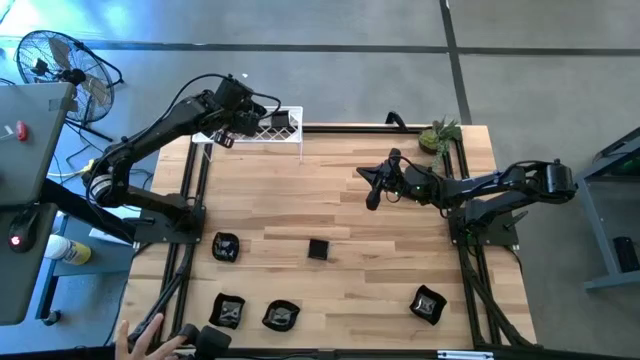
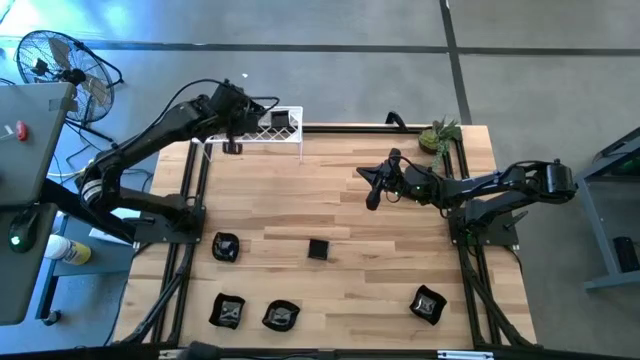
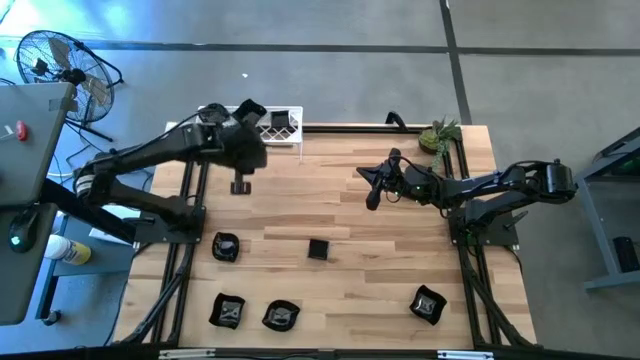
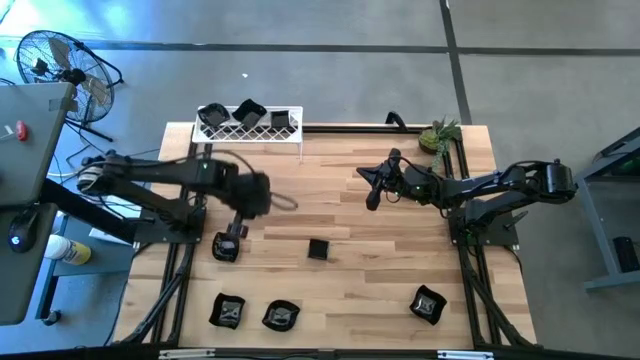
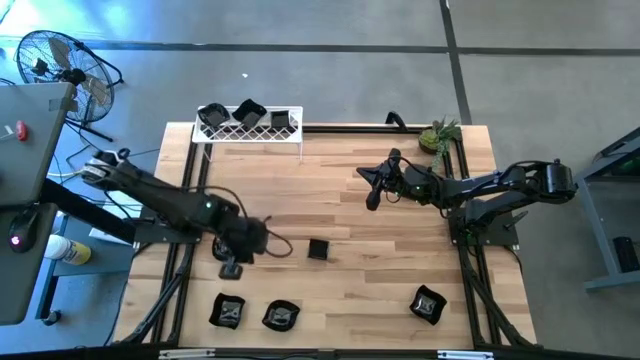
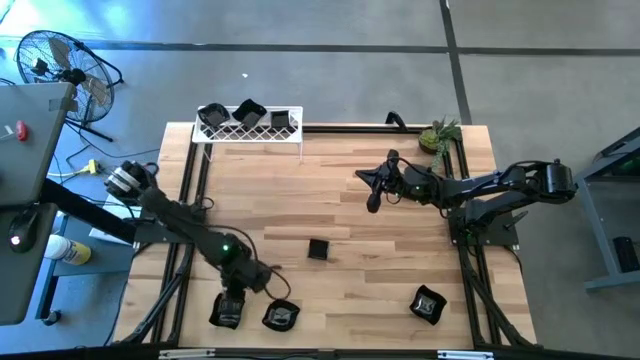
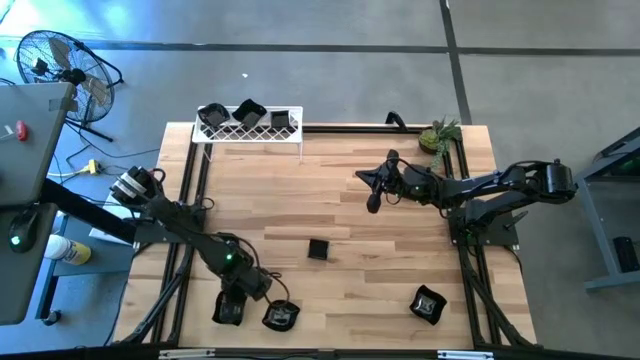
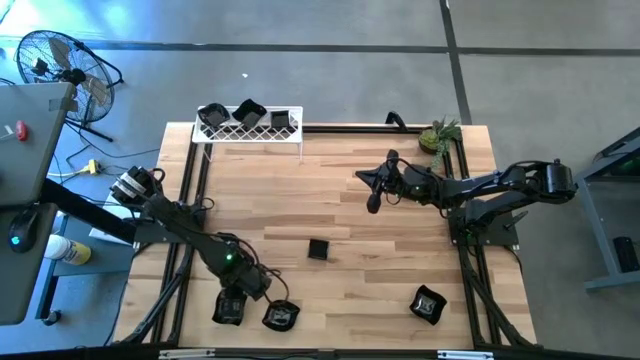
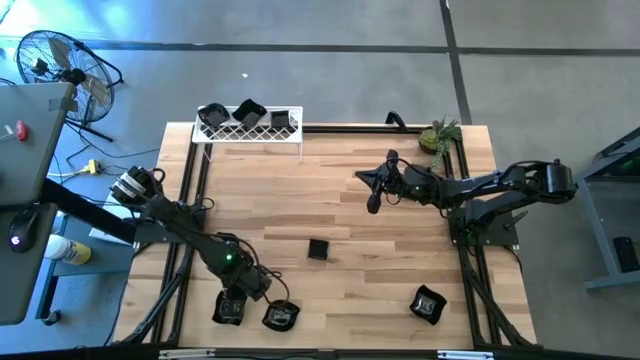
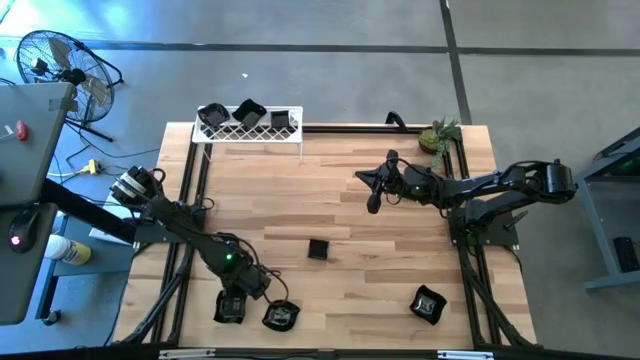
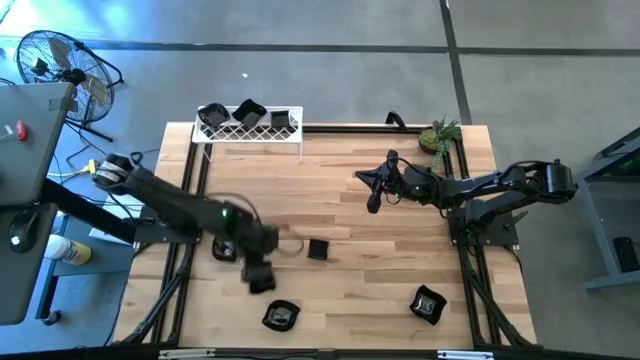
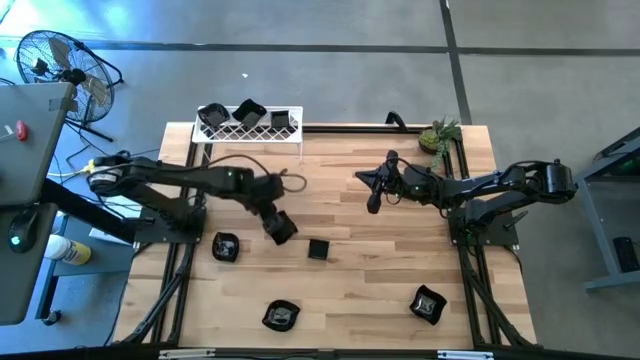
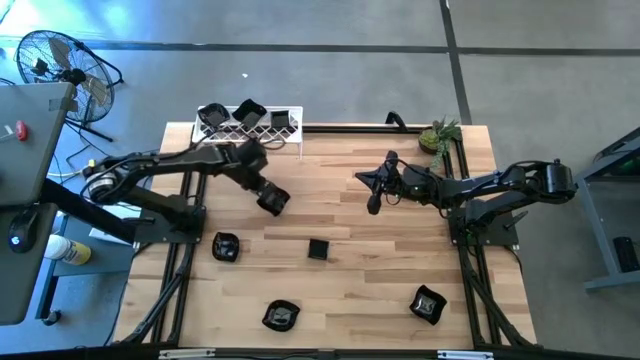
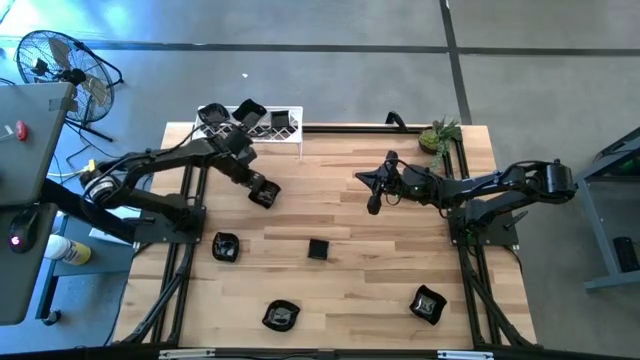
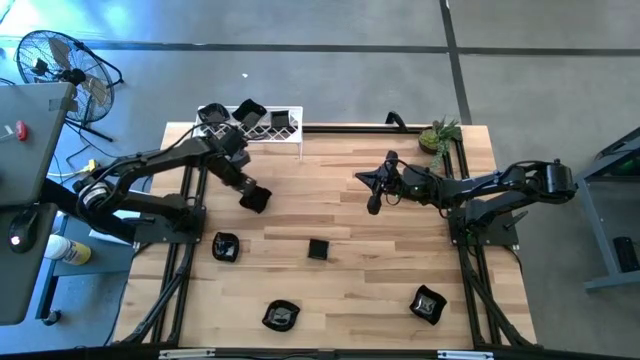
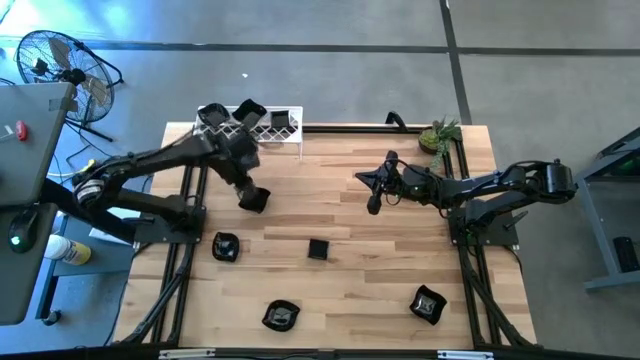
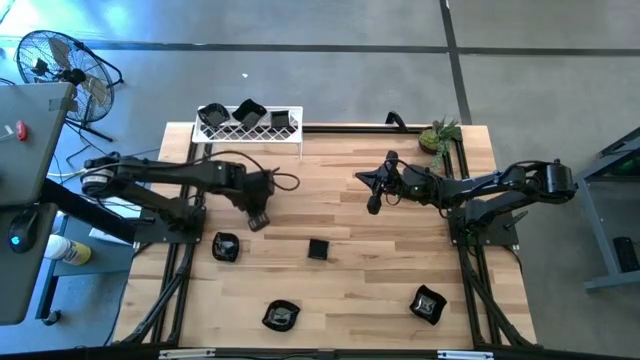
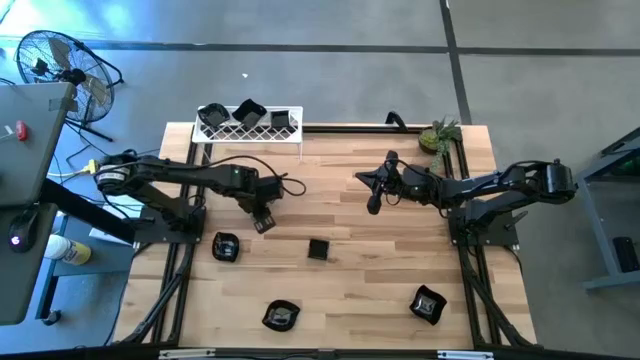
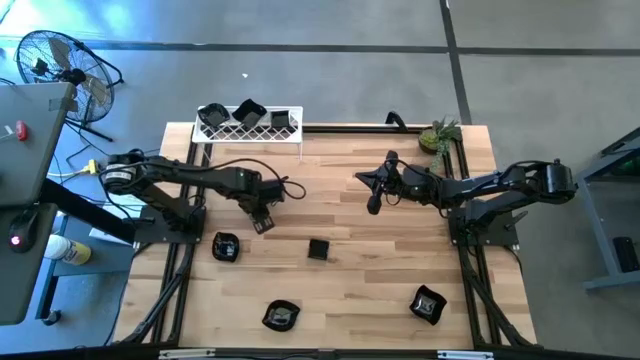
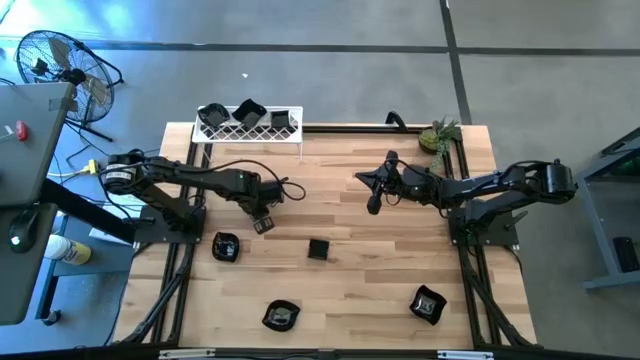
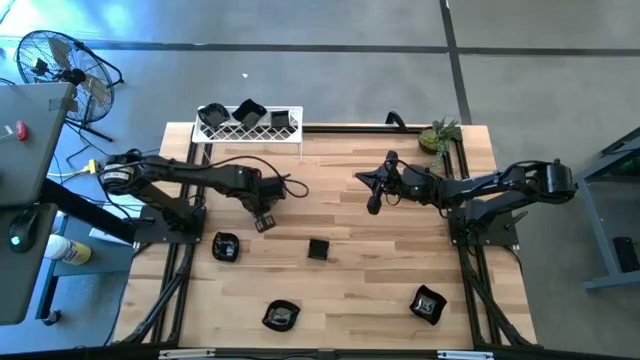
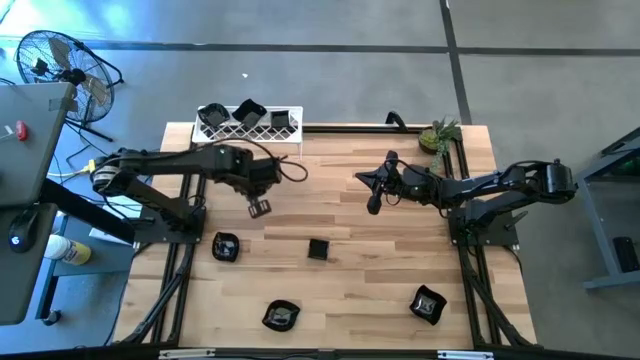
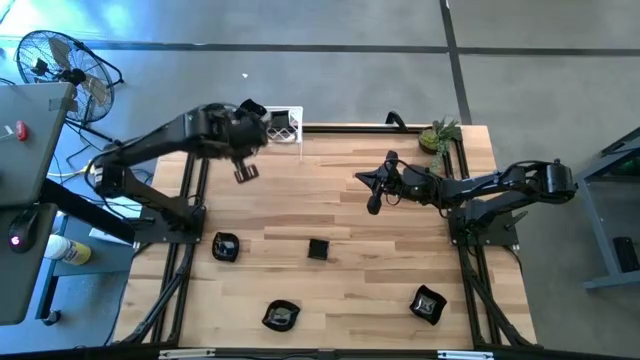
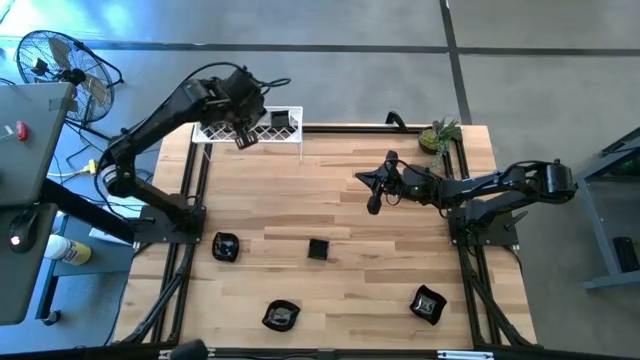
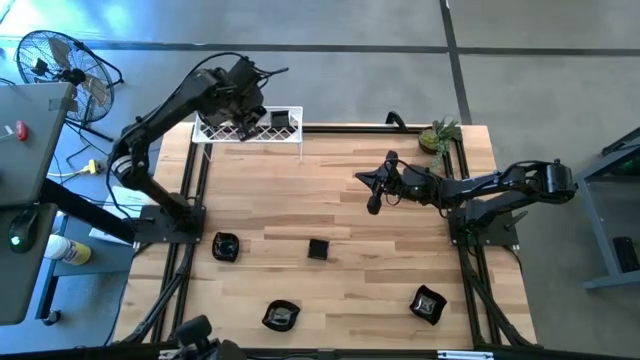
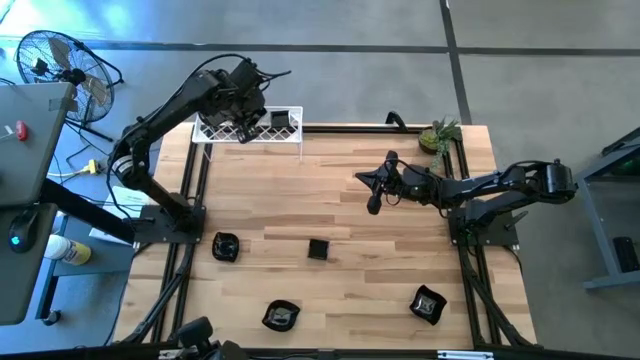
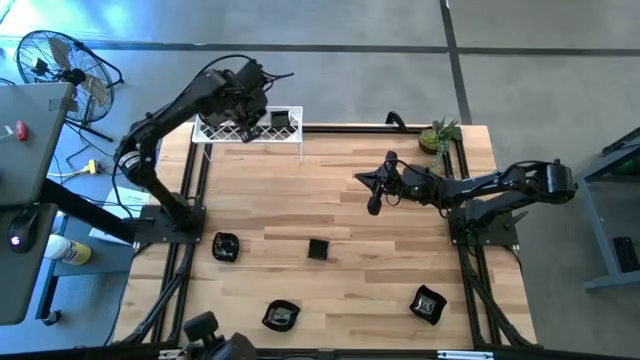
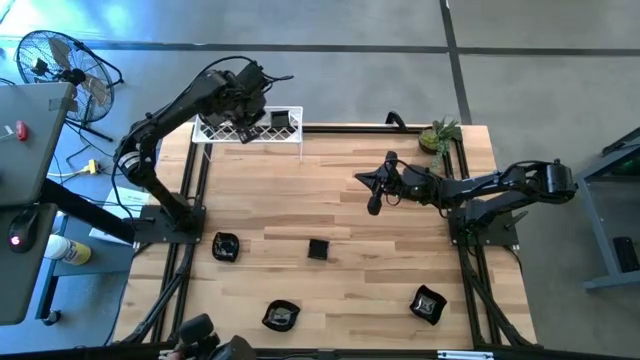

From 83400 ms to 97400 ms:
Task: Pick & Place Mini shaped plates
Stack the black distorted square plate on top of the black distorted square plate on the shelf

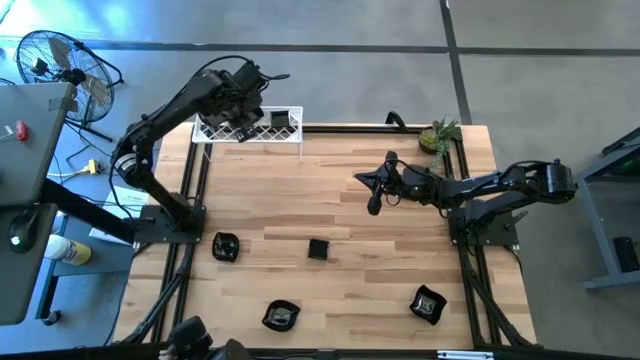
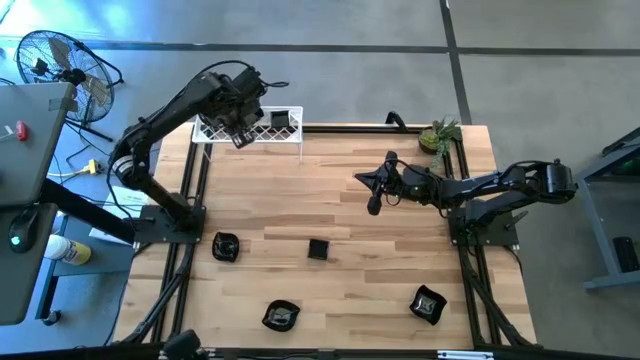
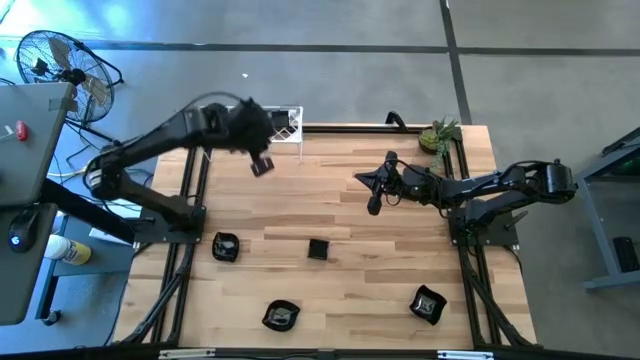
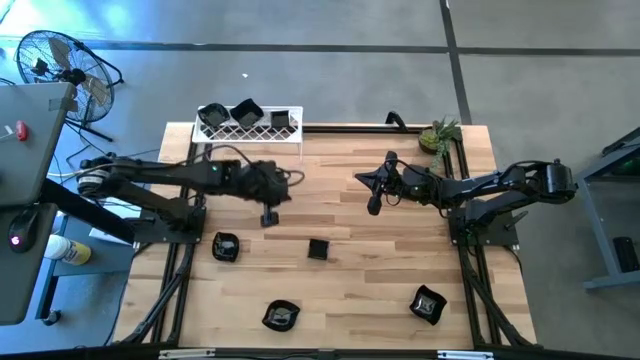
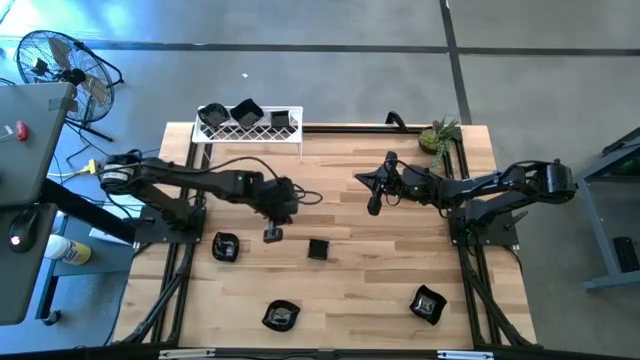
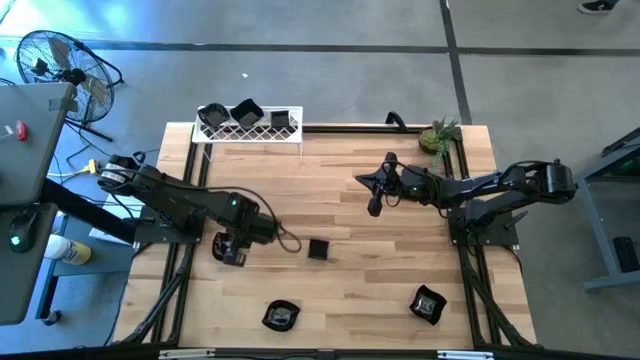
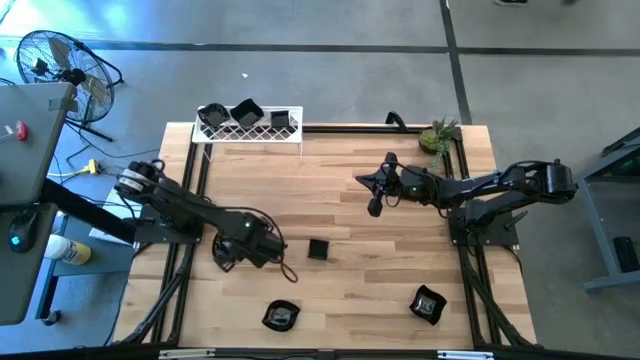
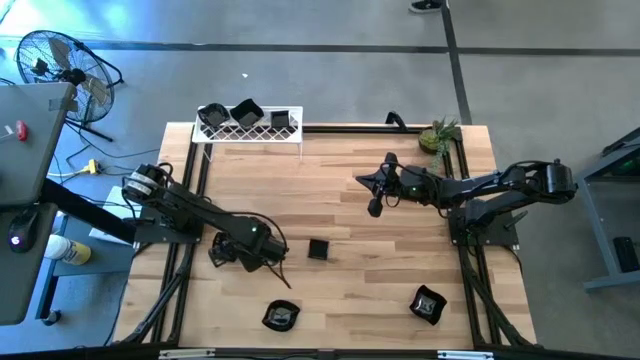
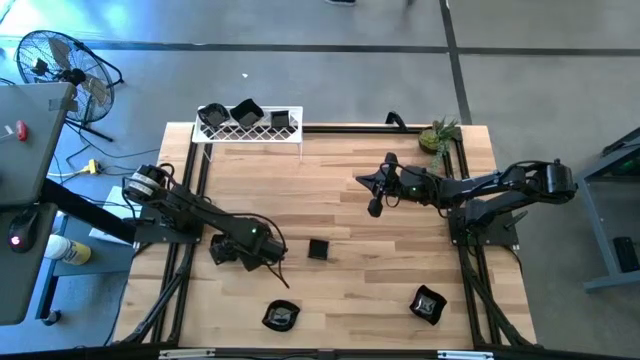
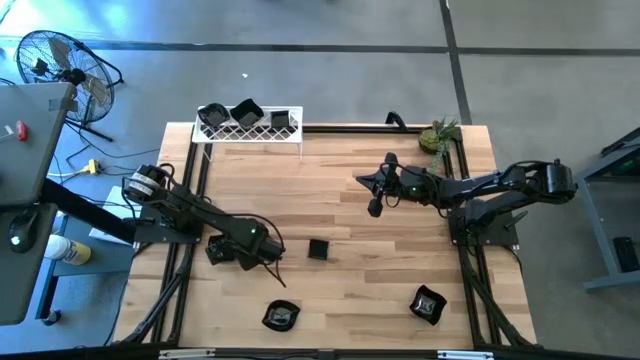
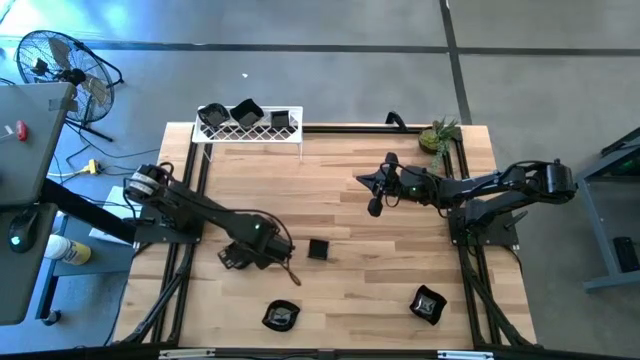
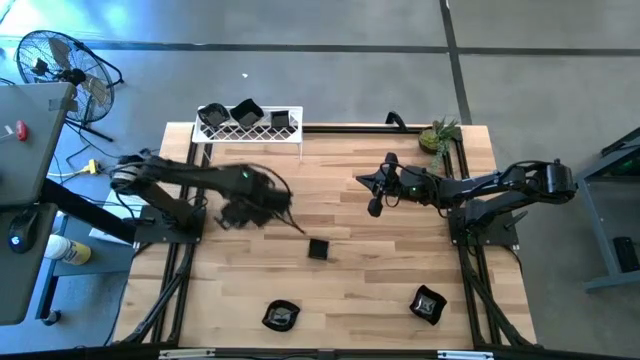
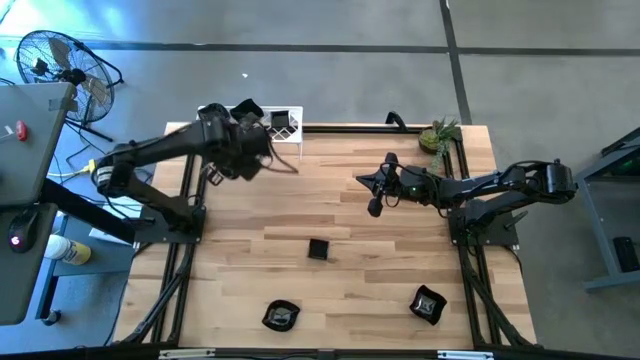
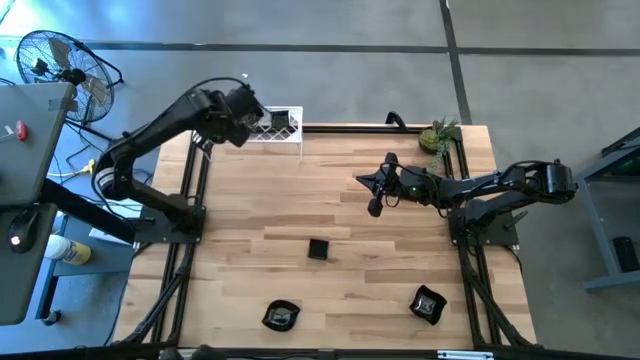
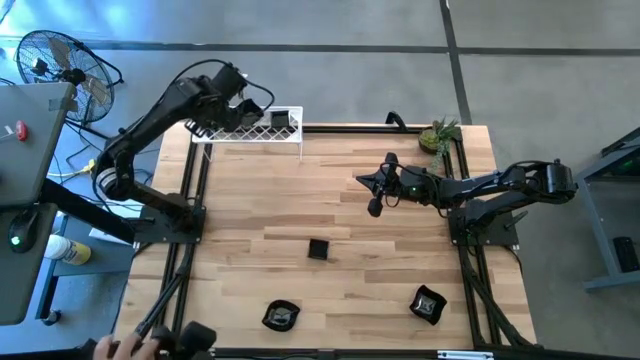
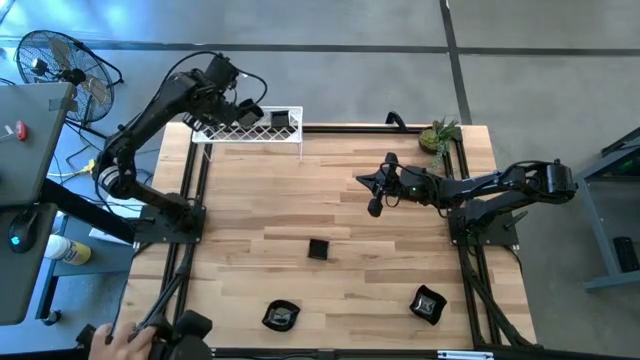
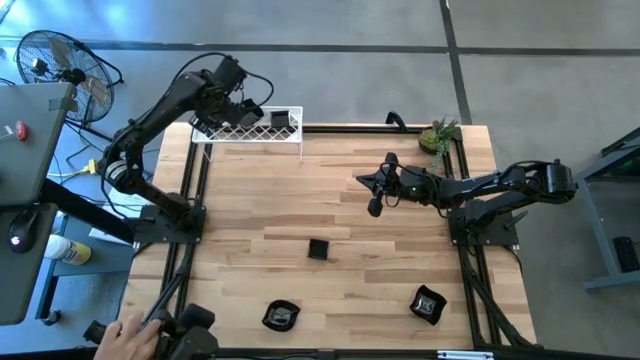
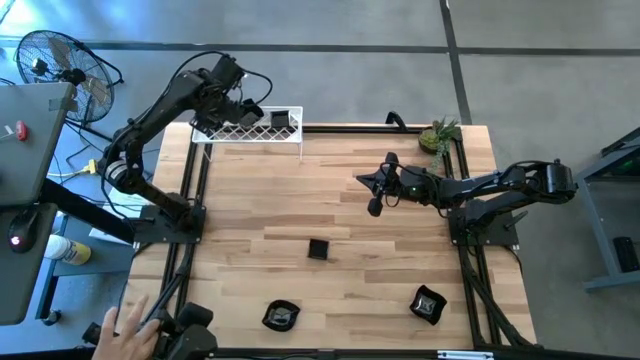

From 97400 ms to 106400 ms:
Stack the black leaf-shaped plate on top of the black leaf-shaped plate on the shelf
